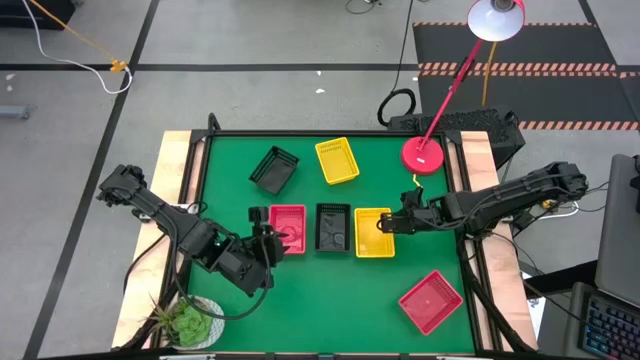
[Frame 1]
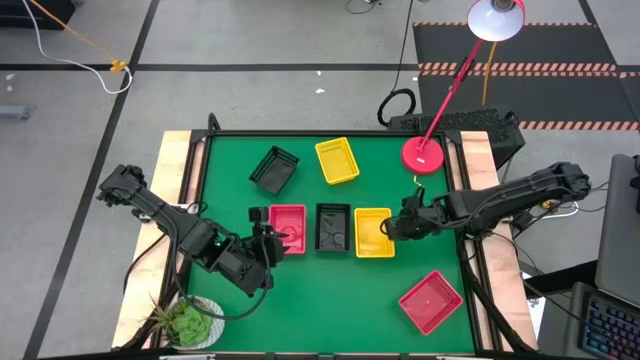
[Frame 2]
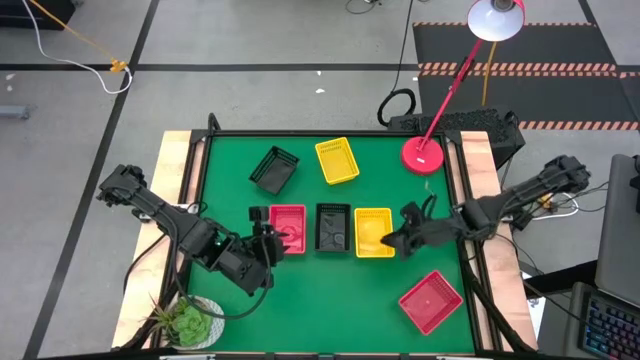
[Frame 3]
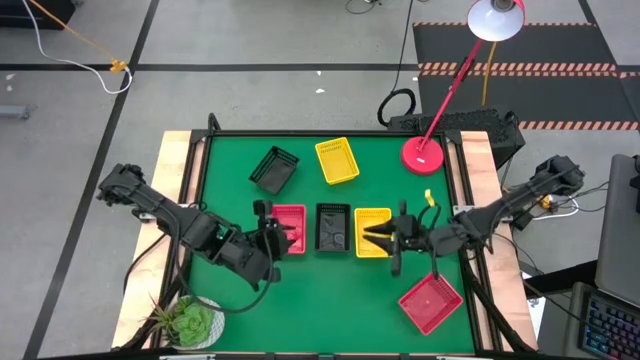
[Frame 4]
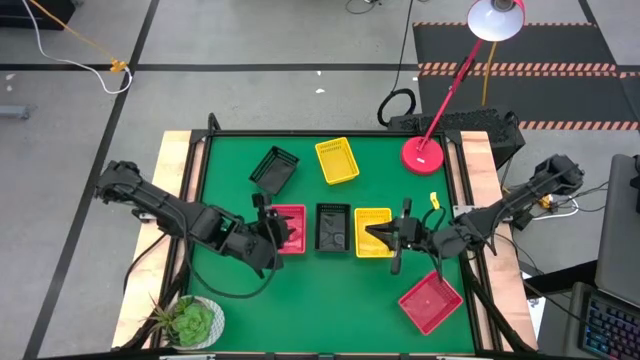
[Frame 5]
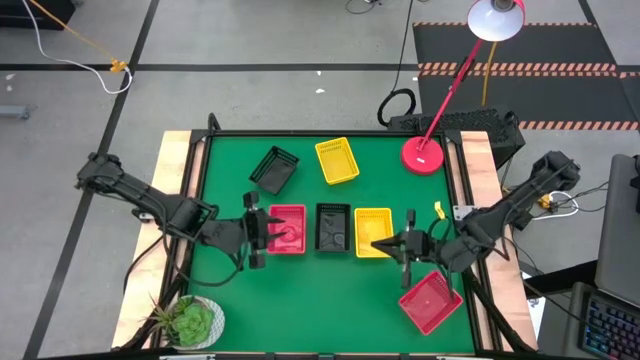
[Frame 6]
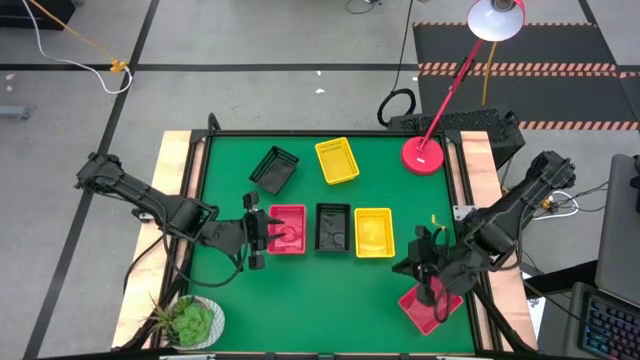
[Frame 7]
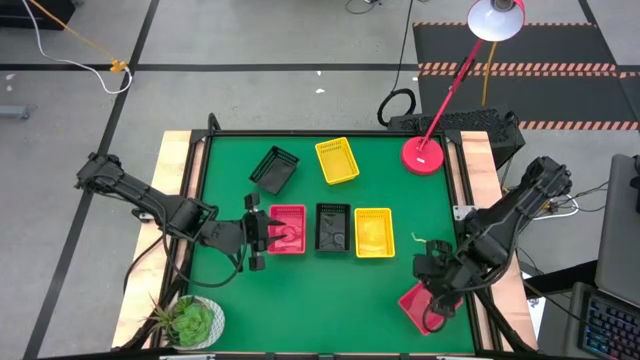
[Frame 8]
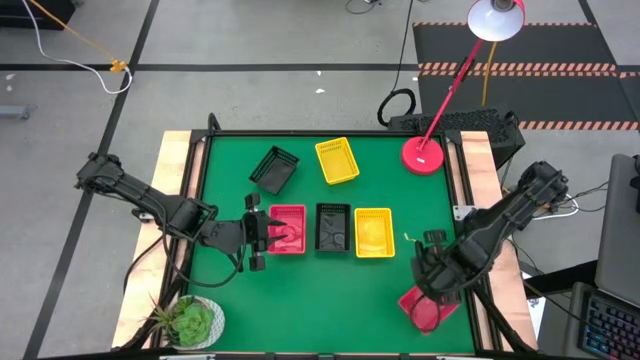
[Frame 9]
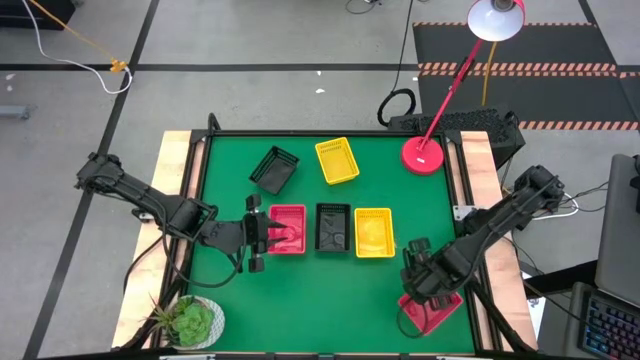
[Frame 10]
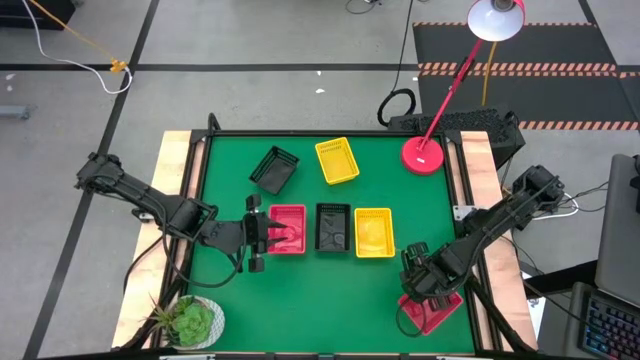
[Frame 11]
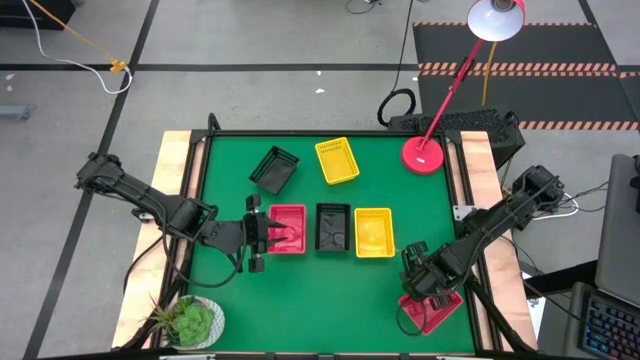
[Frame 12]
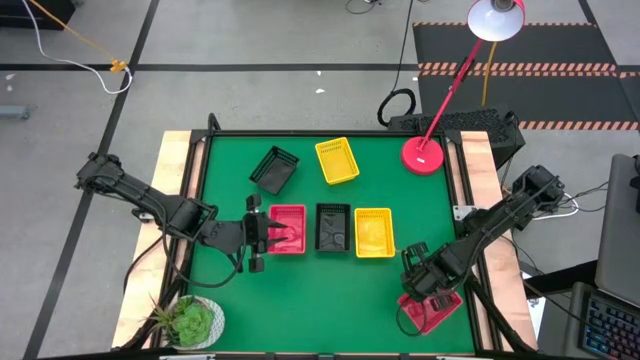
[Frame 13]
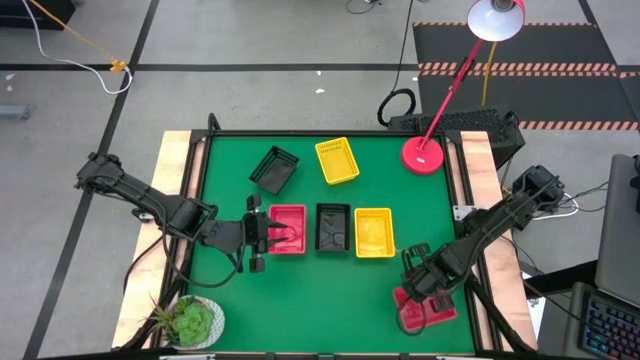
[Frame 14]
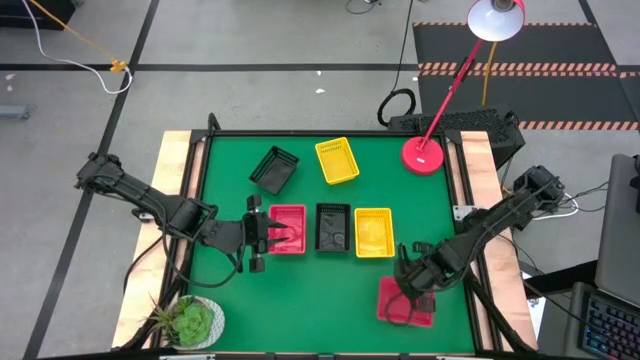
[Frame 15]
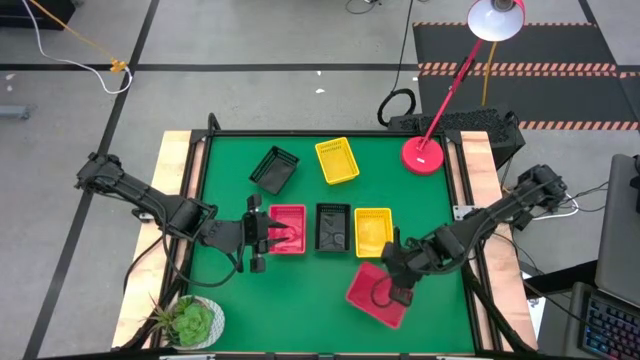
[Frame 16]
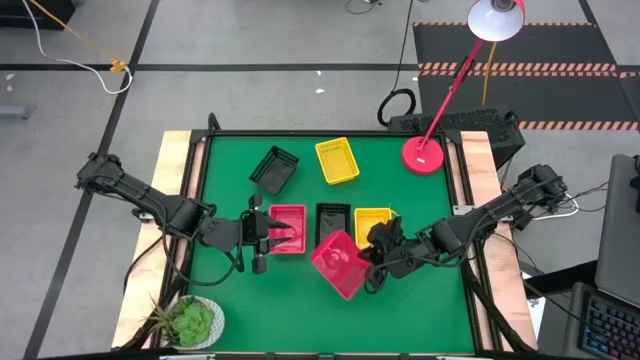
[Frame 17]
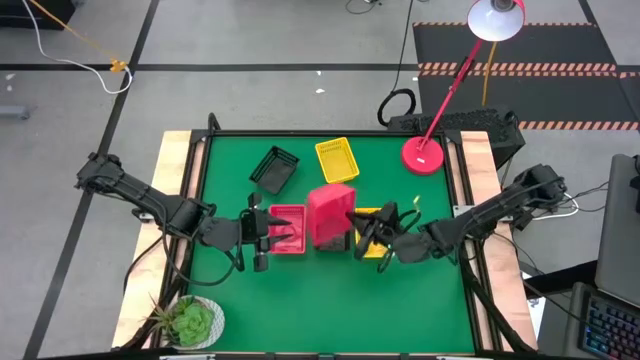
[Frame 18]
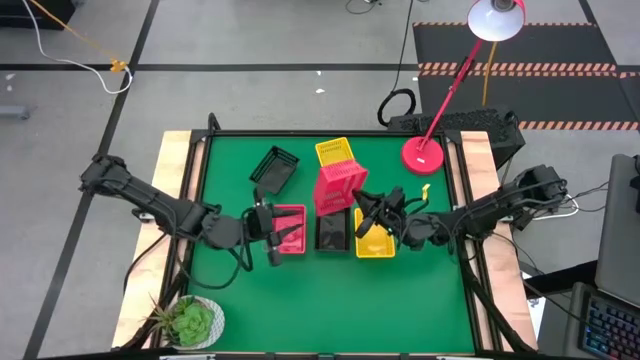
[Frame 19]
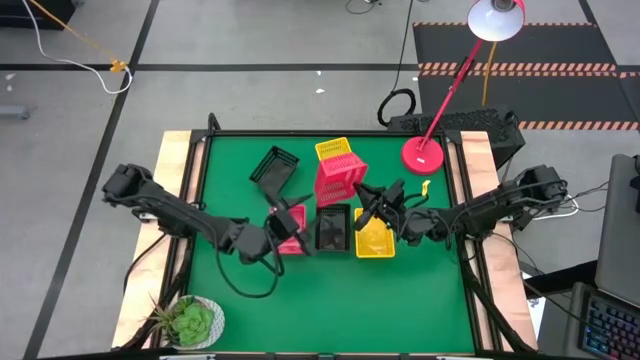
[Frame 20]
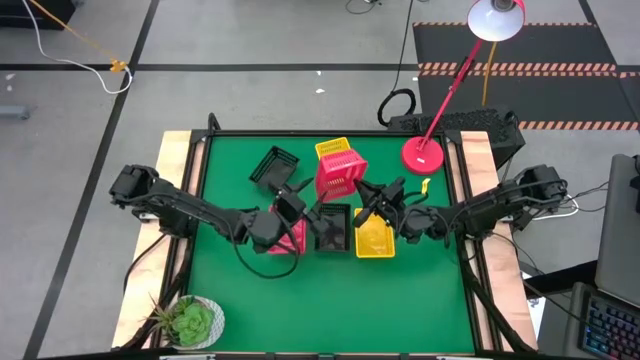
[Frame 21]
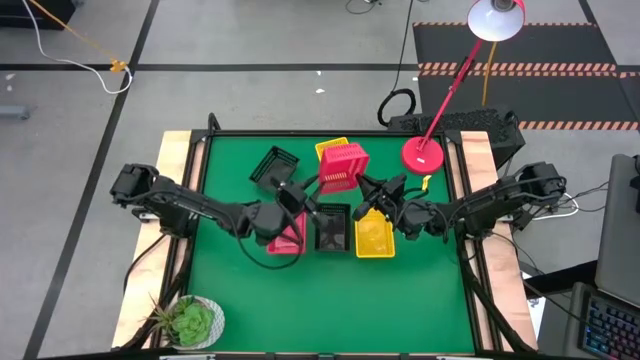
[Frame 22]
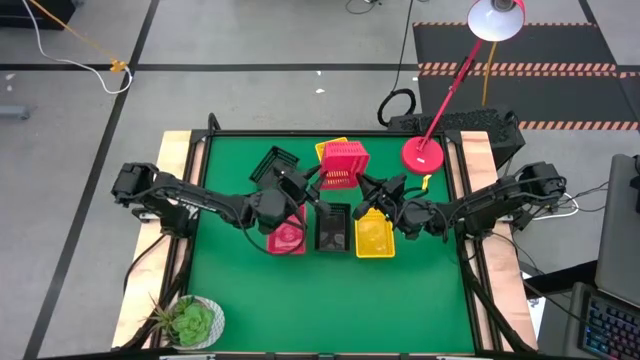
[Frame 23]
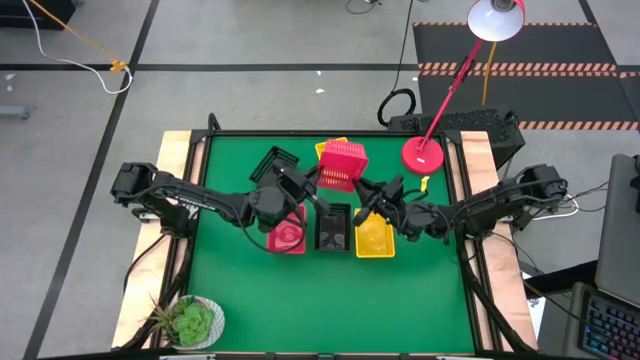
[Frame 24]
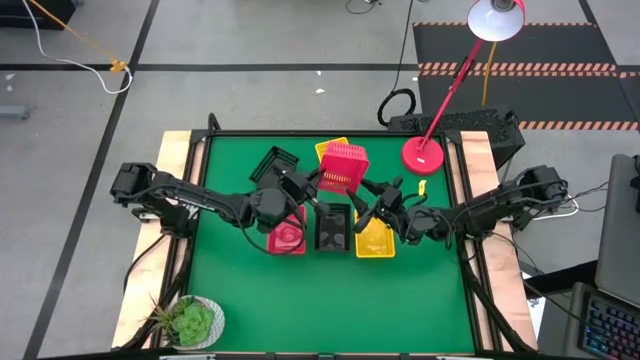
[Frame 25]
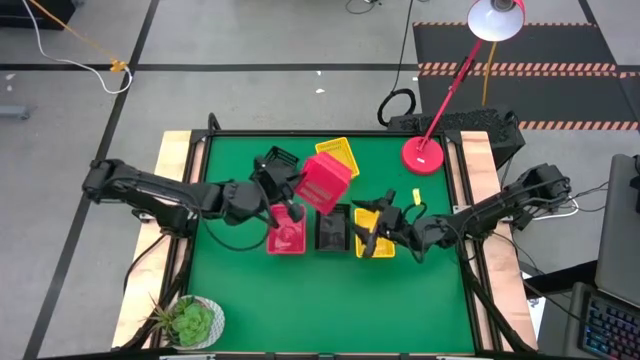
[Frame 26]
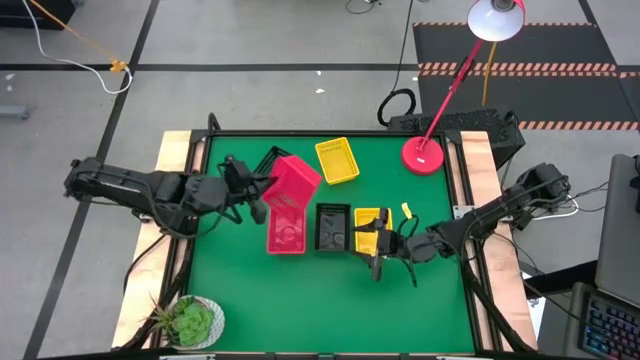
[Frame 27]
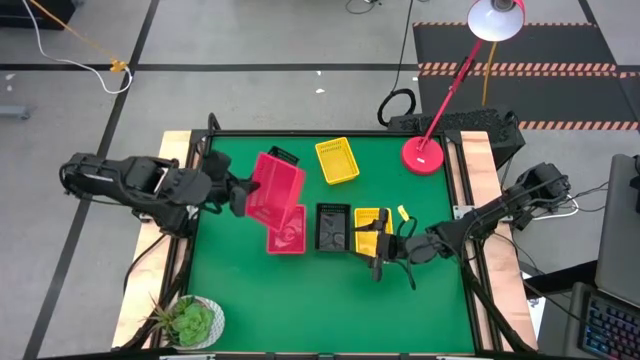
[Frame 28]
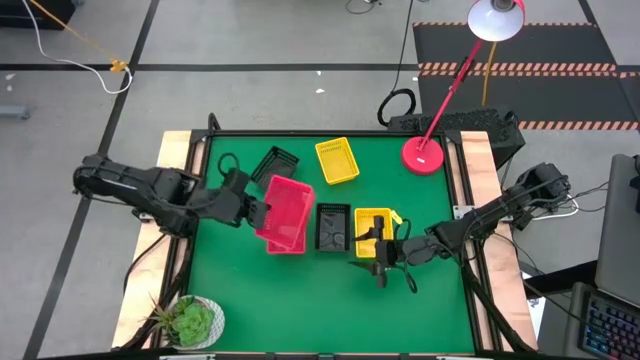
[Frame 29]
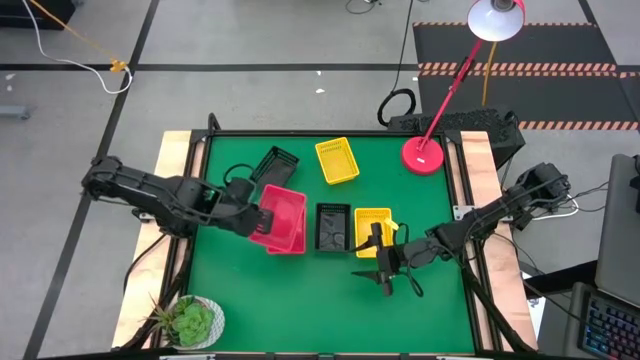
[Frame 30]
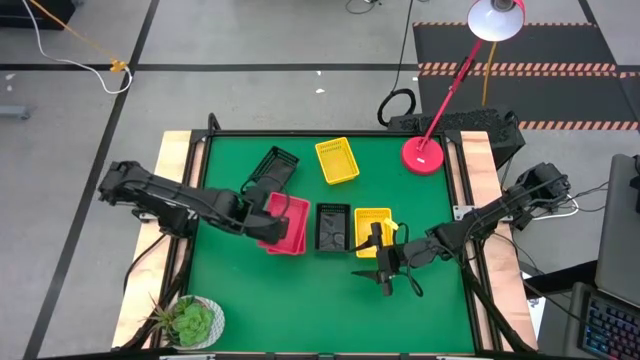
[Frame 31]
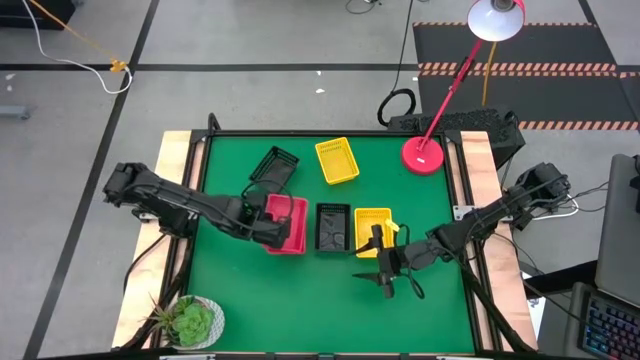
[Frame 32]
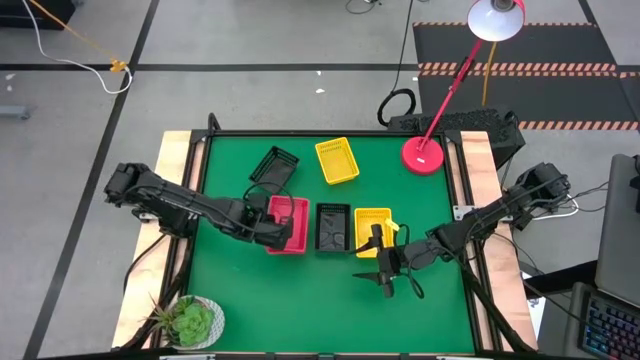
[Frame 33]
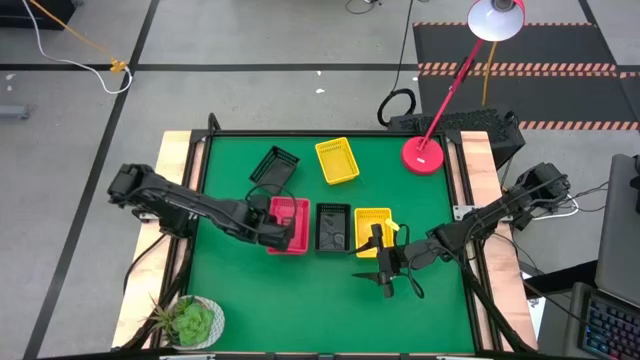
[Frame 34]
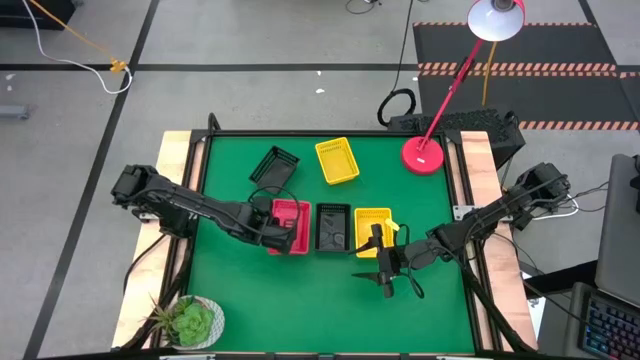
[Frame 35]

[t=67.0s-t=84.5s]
Stack the bottom red bin on top of the top red bin
